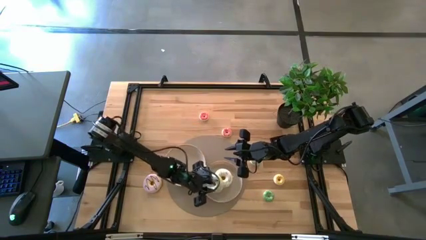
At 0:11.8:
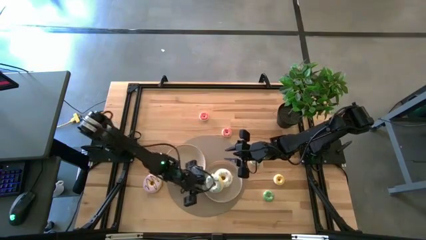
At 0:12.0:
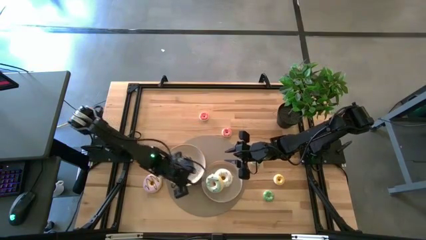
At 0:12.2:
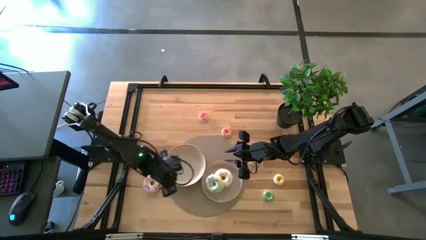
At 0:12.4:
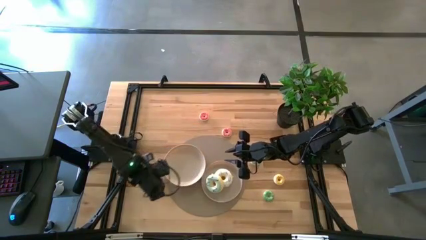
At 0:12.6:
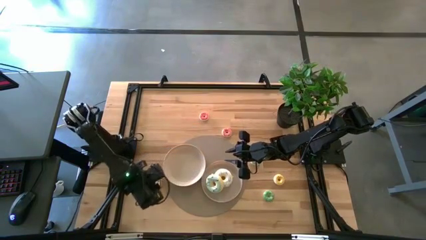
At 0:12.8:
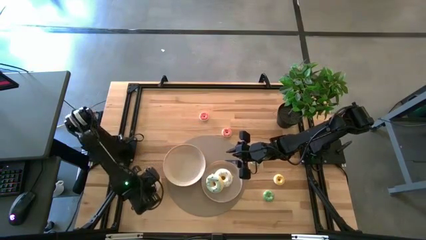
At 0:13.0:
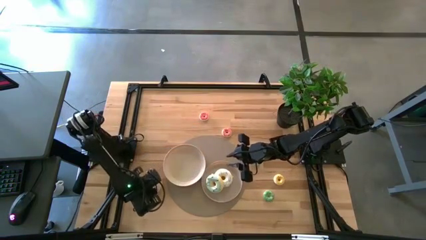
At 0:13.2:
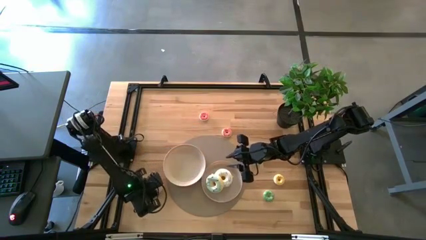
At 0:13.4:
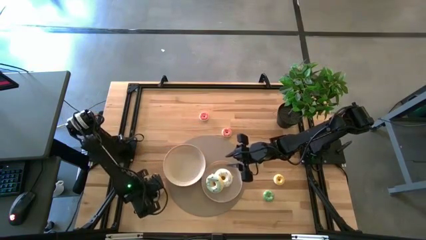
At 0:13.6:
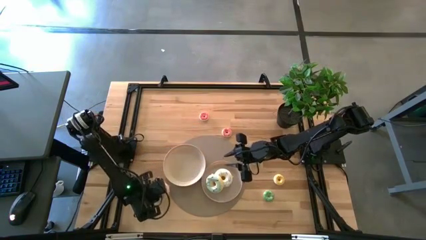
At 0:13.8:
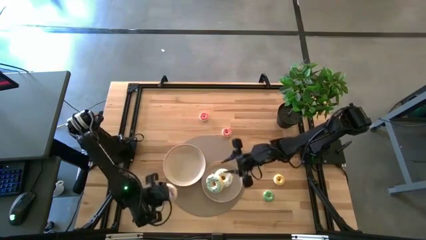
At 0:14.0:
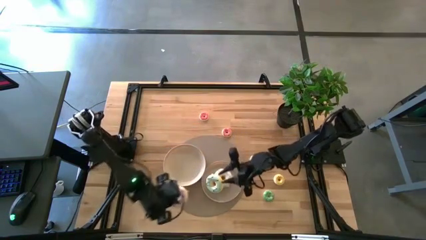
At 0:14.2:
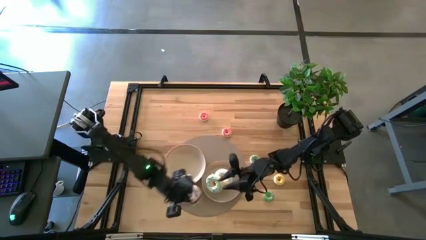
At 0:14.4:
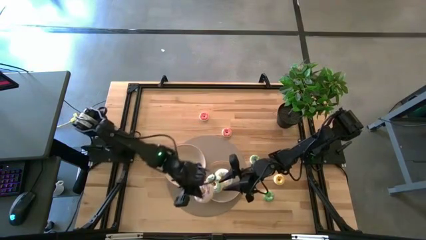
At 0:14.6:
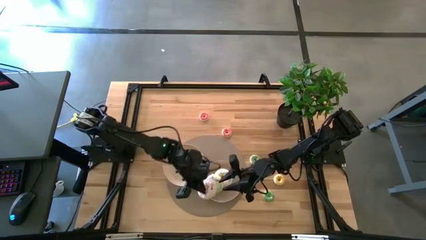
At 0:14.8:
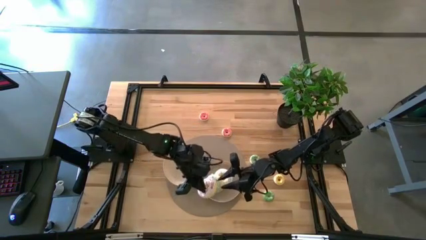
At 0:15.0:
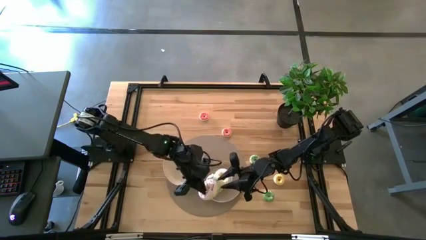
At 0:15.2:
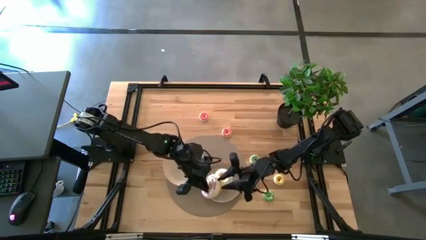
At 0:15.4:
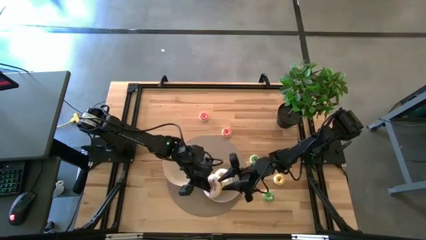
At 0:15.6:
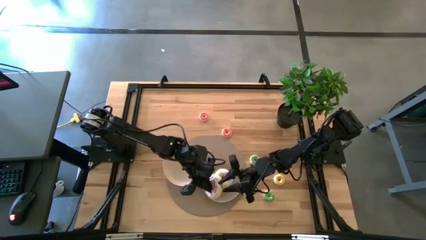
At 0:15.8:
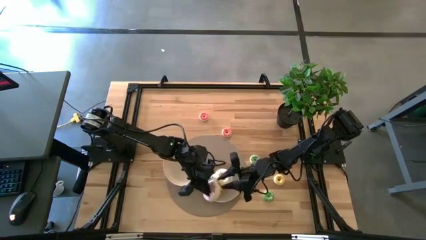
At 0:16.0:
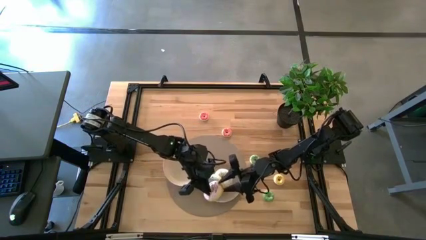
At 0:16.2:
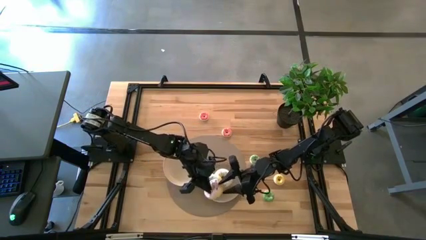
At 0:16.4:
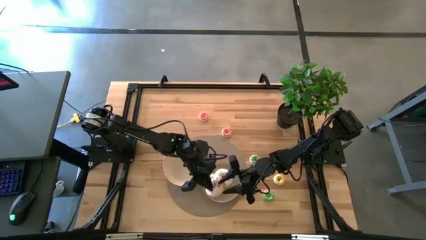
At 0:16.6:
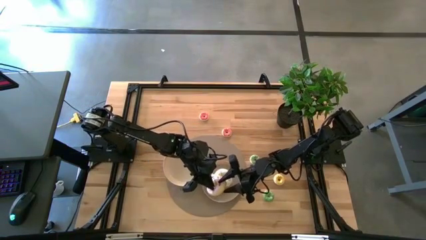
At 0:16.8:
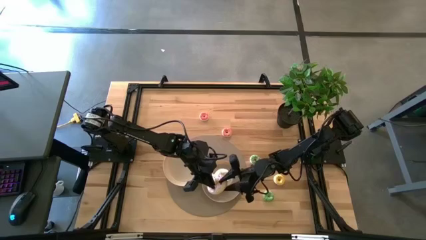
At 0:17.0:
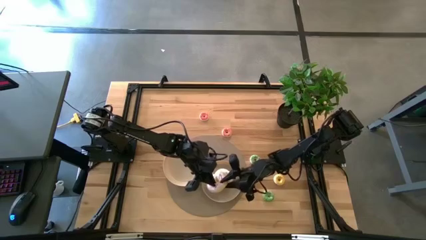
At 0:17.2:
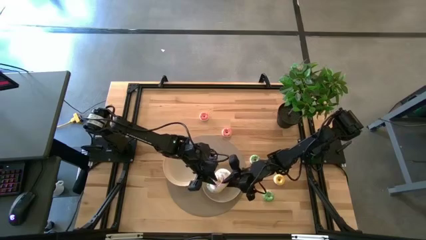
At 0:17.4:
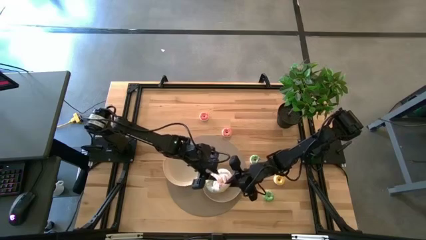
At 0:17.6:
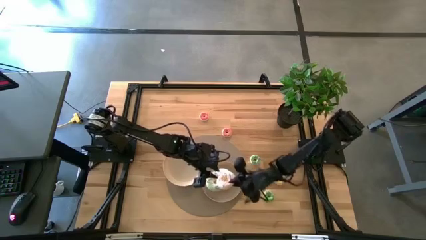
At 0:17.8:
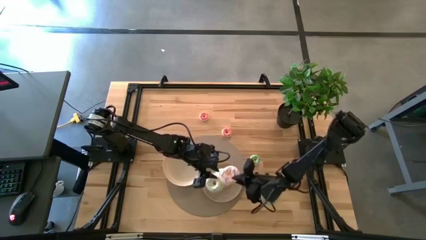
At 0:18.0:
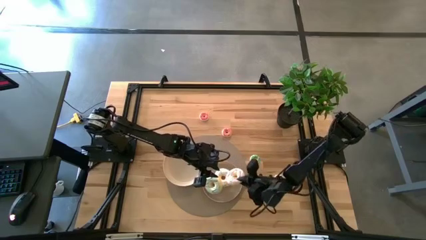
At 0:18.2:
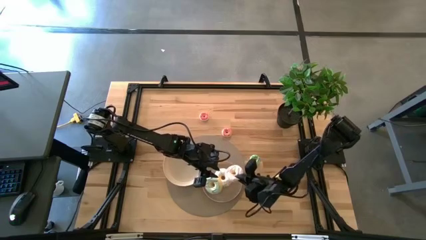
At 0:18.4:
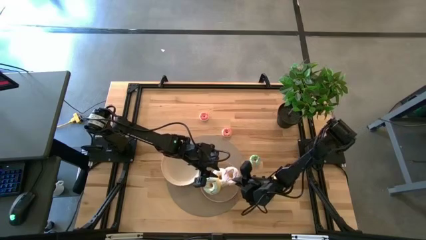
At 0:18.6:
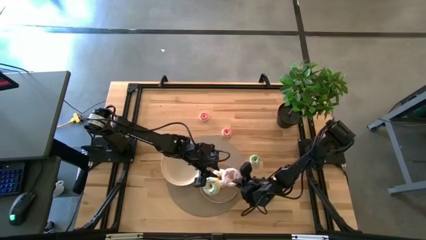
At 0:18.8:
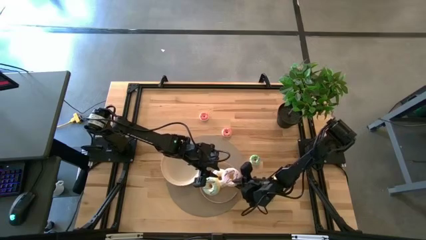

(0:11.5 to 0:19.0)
Task: Pick & Place donuts
Put the large purple donut on the bottom white plate

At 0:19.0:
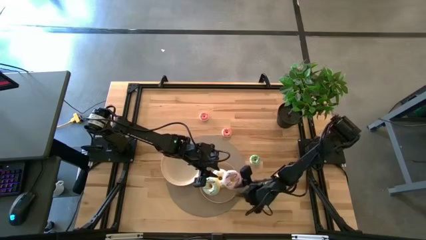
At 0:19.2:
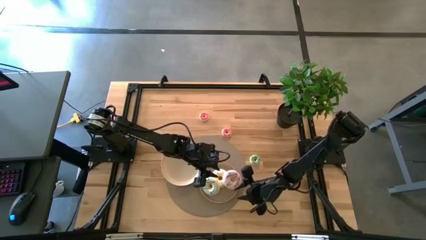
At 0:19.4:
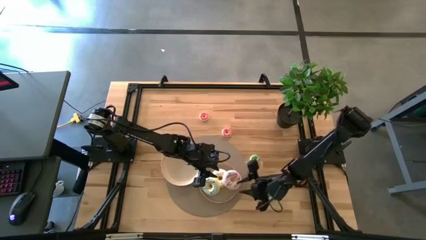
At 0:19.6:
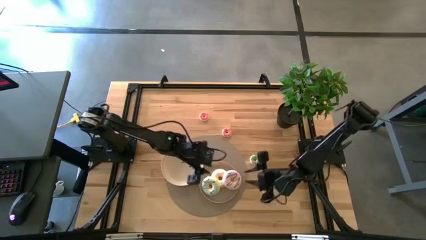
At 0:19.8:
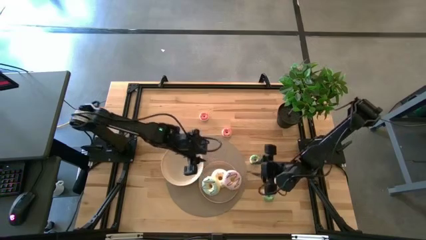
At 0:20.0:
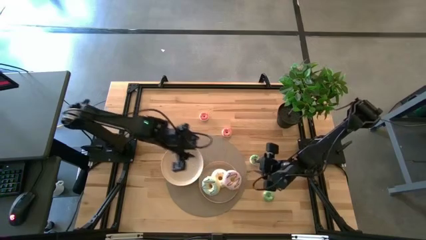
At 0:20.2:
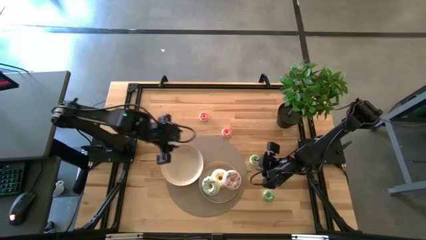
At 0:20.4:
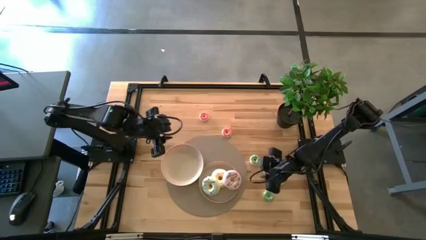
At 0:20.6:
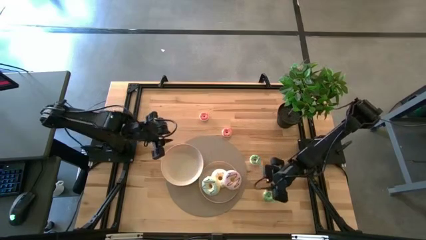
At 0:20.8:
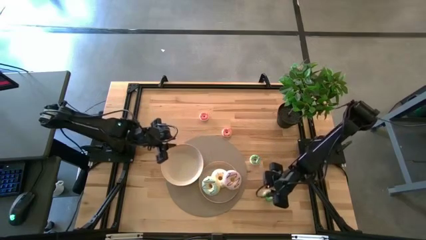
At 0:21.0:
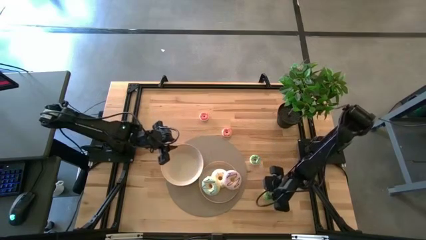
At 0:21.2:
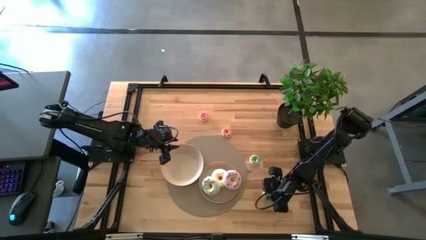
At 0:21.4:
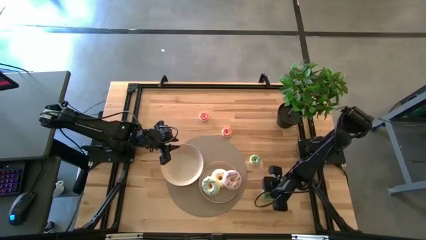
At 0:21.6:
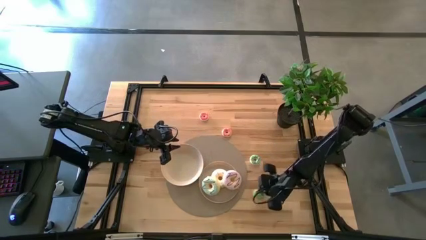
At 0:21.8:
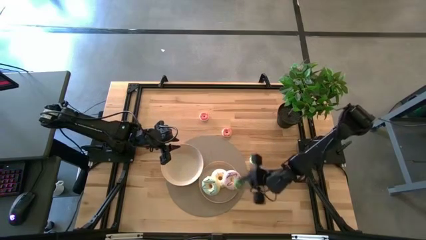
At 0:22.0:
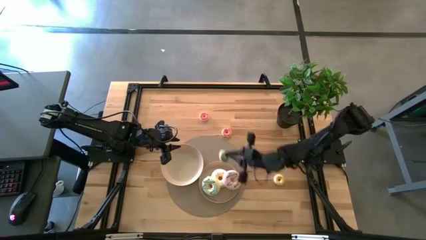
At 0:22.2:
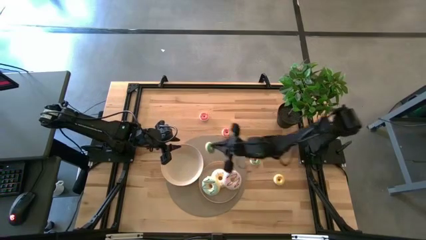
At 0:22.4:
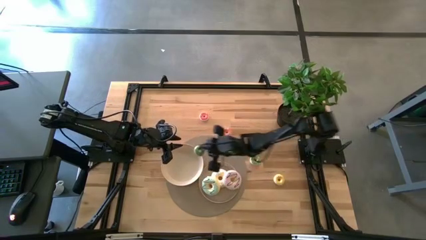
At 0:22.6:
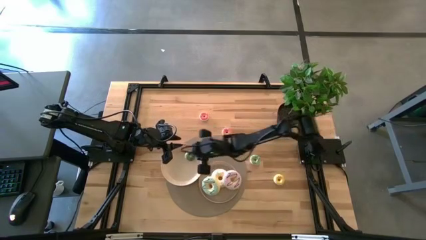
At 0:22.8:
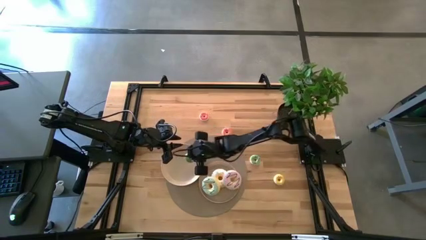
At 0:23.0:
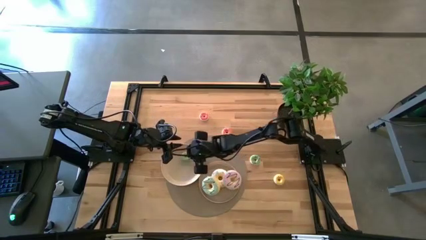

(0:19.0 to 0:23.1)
Put the bottom small green donut on the top white plate

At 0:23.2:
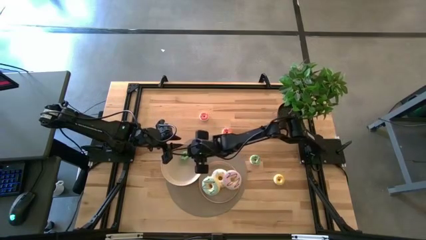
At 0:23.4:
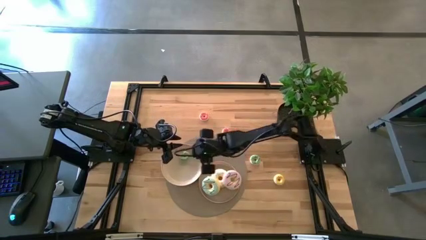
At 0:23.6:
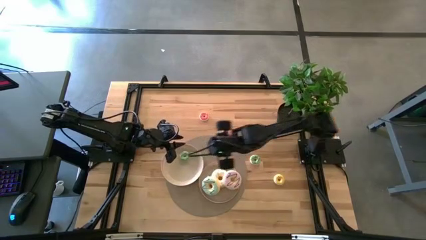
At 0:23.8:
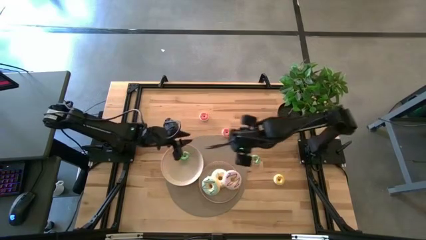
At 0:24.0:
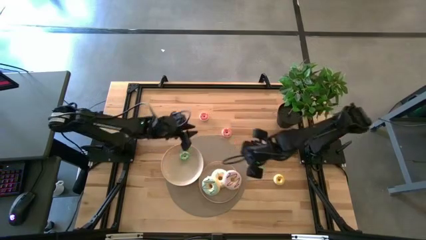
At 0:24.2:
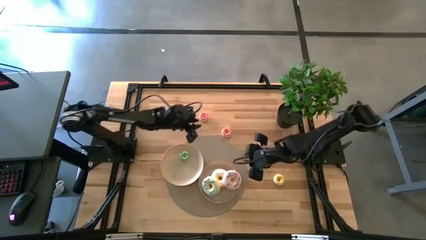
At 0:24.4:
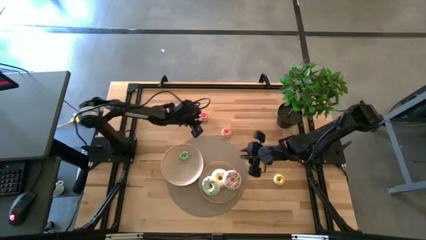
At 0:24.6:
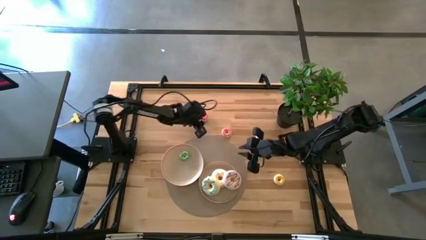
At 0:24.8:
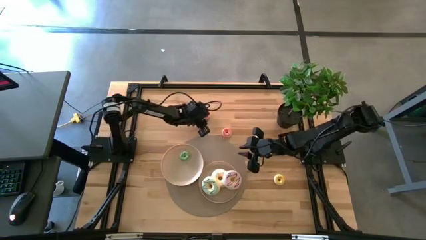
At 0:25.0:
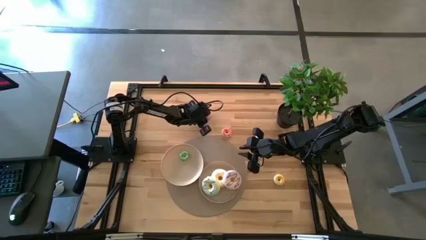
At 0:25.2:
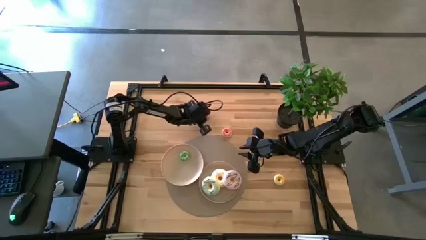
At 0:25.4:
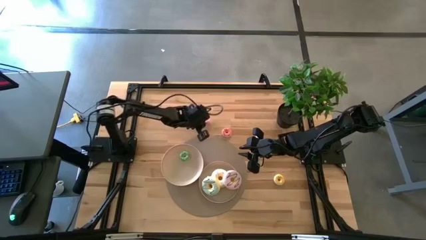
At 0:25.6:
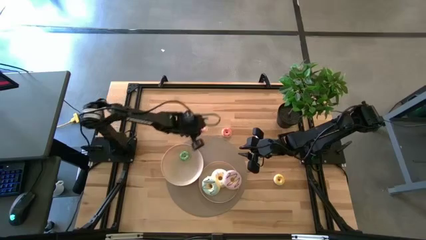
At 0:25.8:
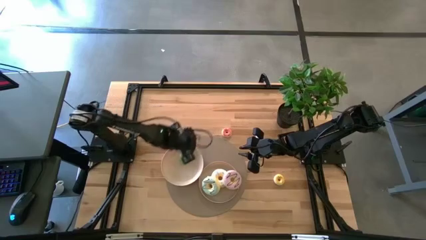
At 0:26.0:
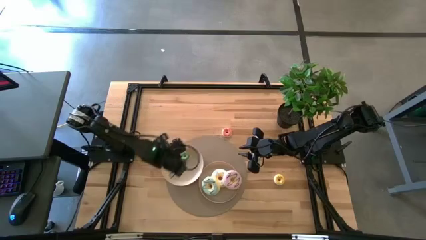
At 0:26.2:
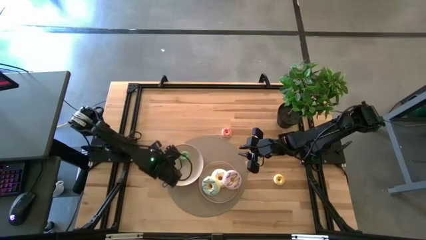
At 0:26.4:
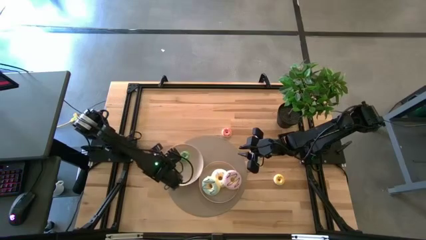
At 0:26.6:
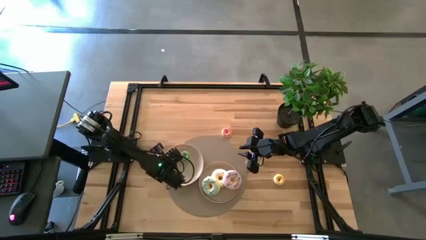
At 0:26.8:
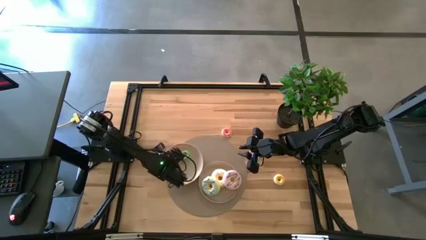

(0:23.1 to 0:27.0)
Put the top small pink donut on the top white plate

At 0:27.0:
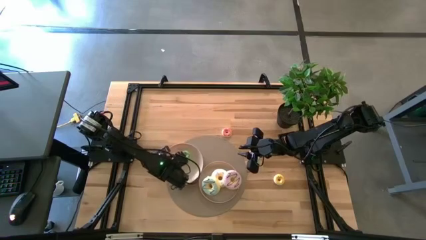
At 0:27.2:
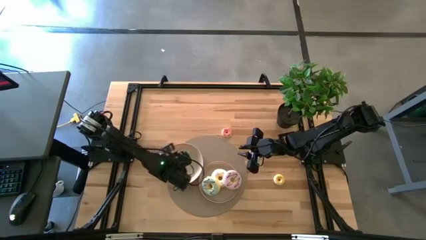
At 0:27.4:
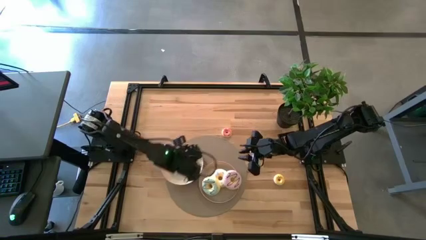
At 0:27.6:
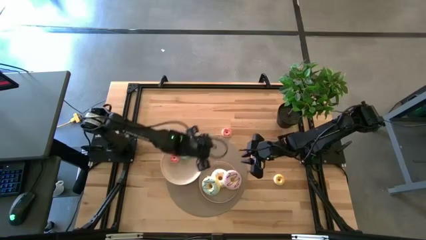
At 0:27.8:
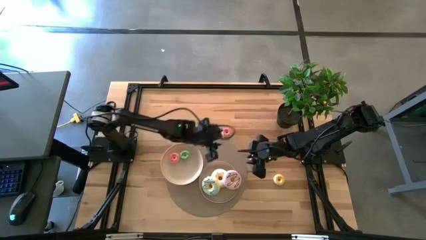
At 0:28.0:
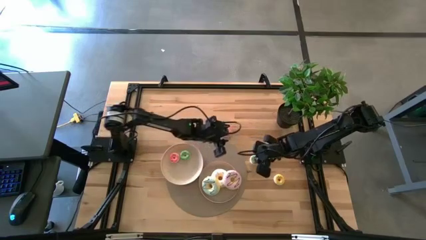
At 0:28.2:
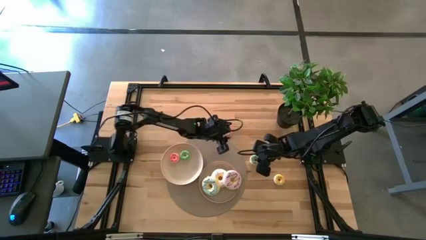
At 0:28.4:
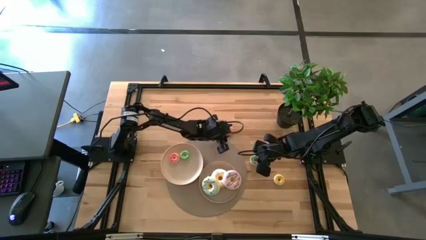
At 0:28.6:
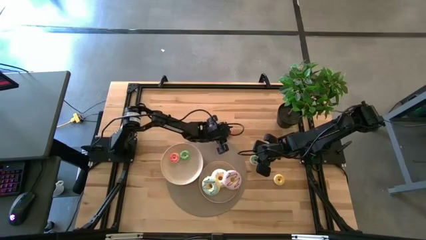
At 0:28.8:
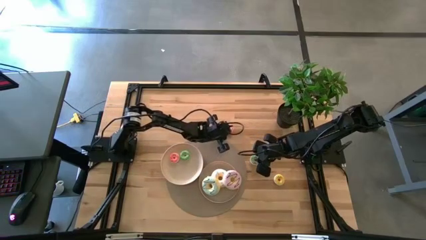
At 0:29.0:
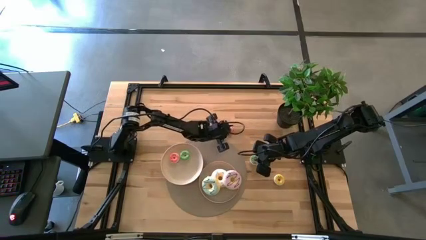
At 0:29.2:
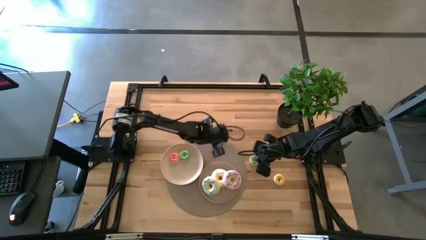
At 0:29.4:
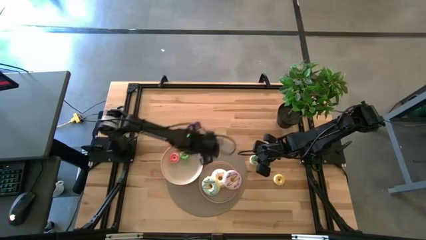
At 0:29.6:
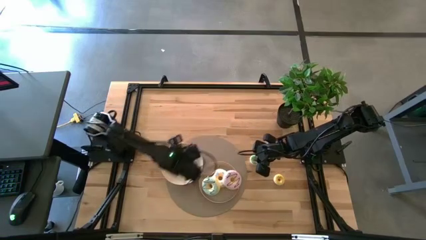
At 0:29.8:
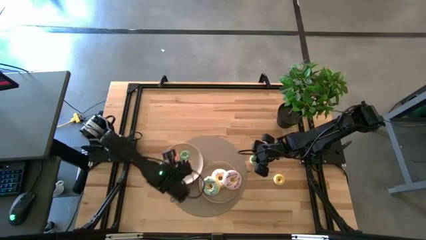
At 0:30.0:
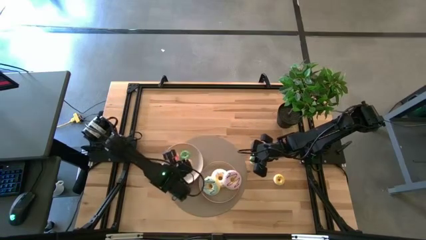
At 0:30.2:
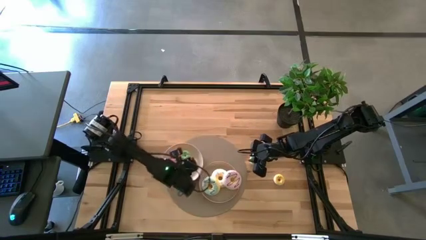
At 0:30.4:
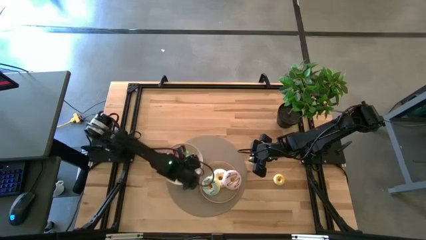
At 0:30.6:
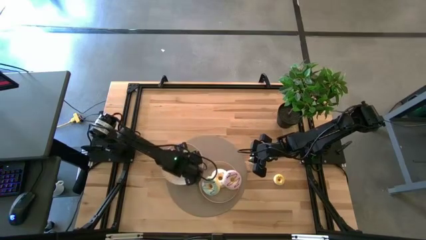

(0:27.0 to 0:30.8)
Put the small pink donut on the top white plate
